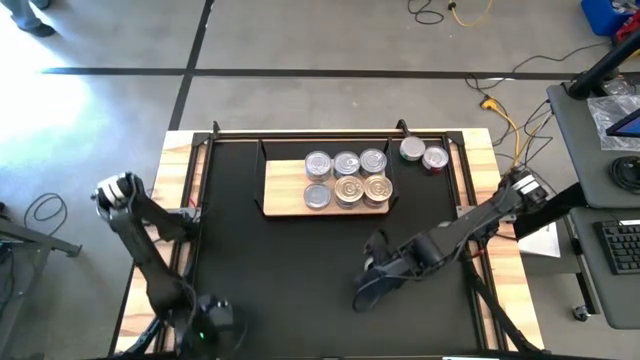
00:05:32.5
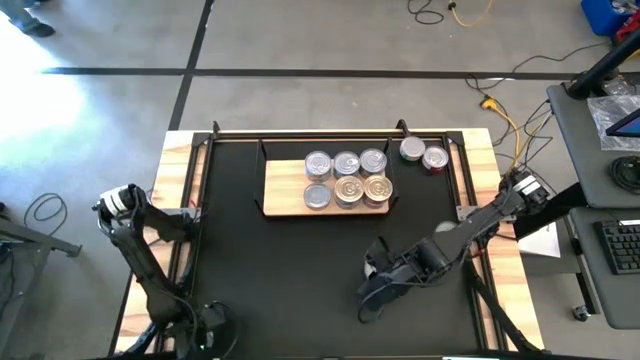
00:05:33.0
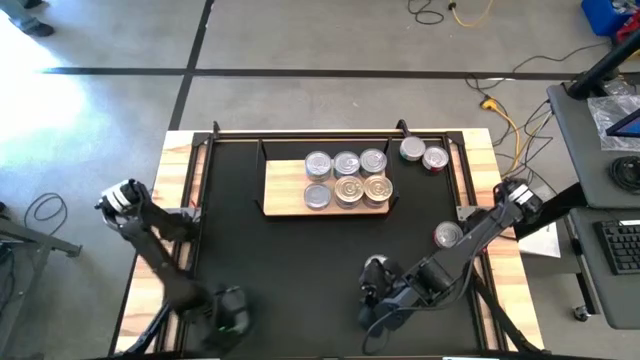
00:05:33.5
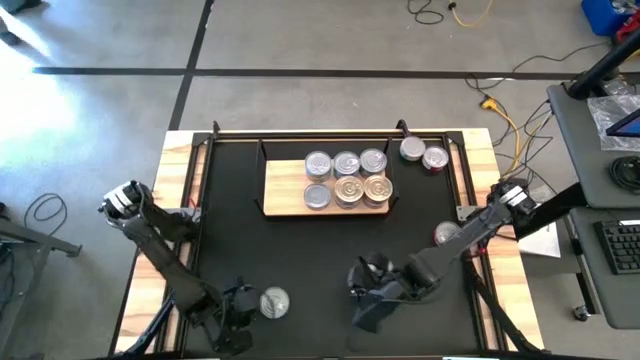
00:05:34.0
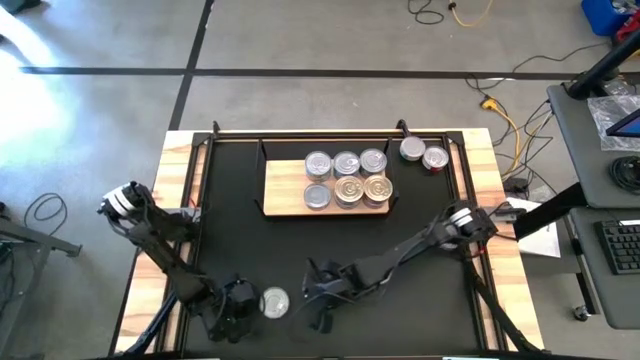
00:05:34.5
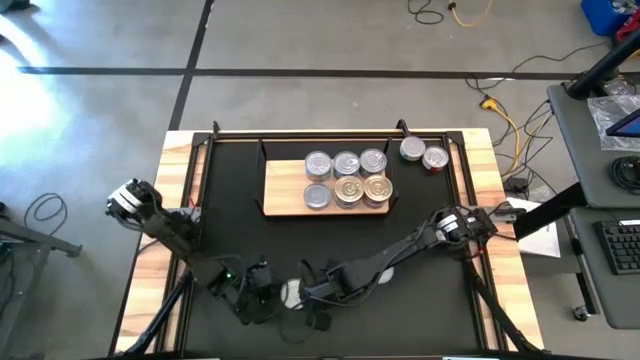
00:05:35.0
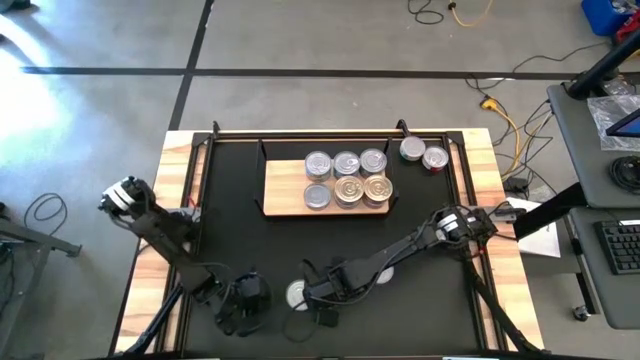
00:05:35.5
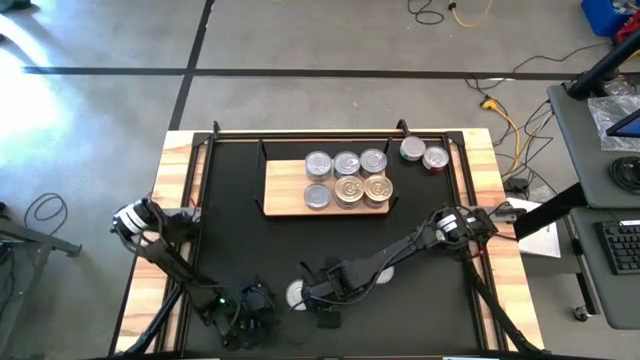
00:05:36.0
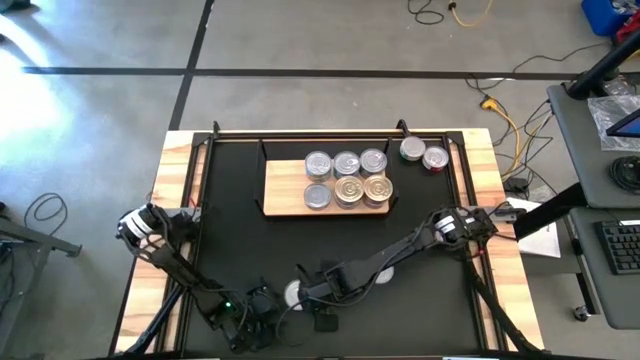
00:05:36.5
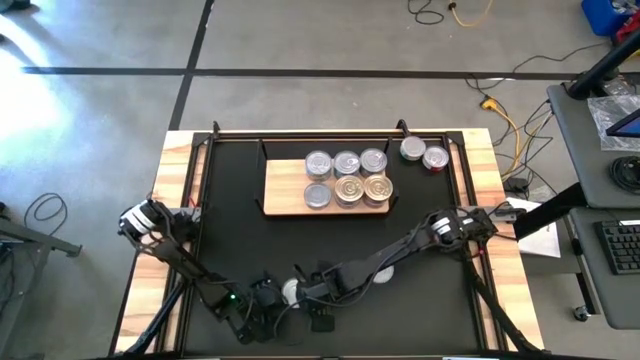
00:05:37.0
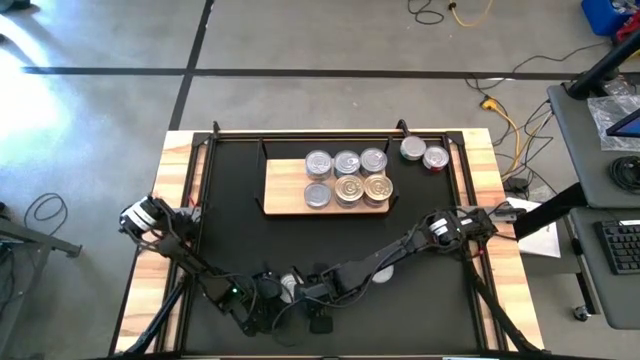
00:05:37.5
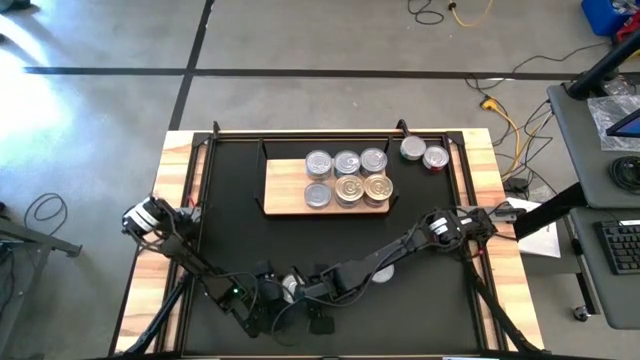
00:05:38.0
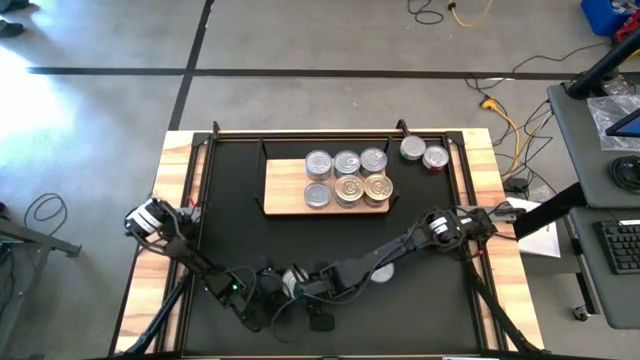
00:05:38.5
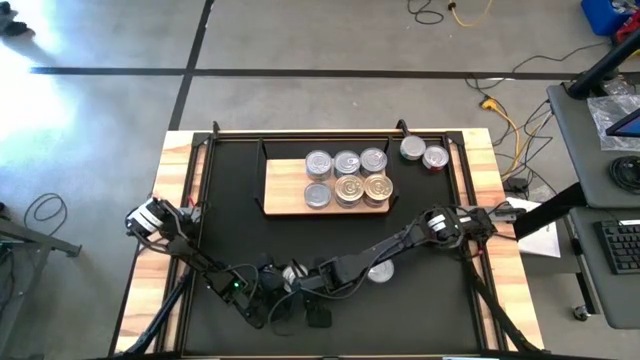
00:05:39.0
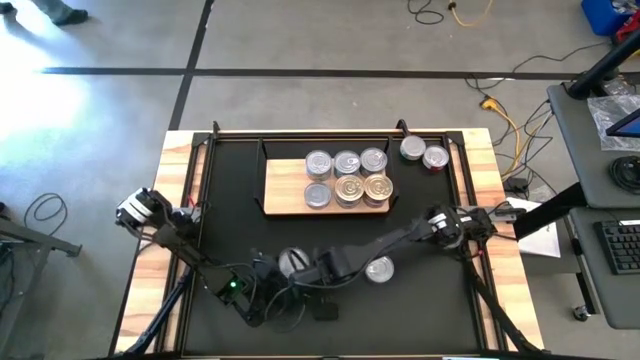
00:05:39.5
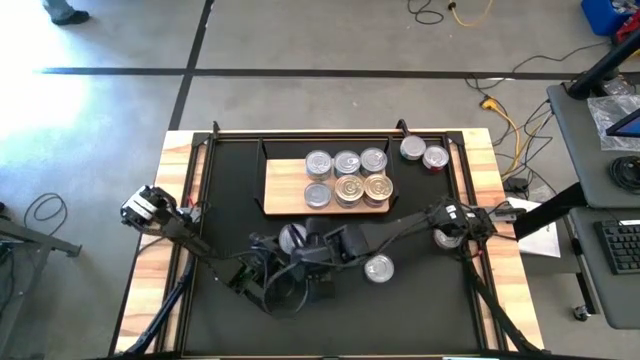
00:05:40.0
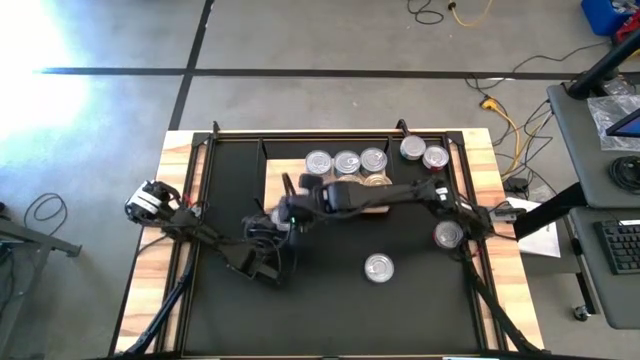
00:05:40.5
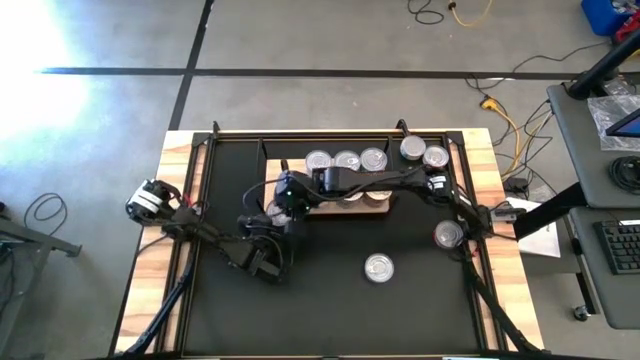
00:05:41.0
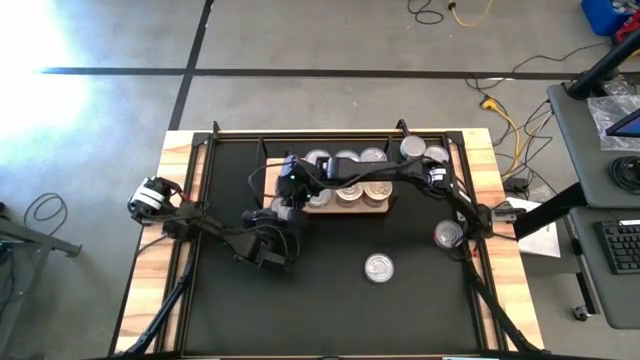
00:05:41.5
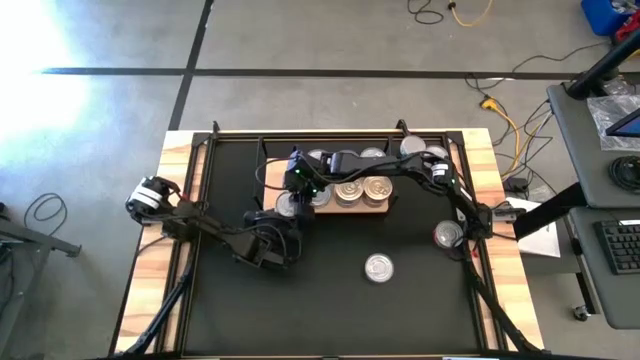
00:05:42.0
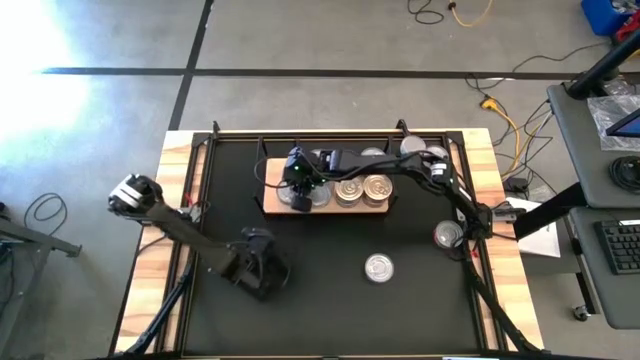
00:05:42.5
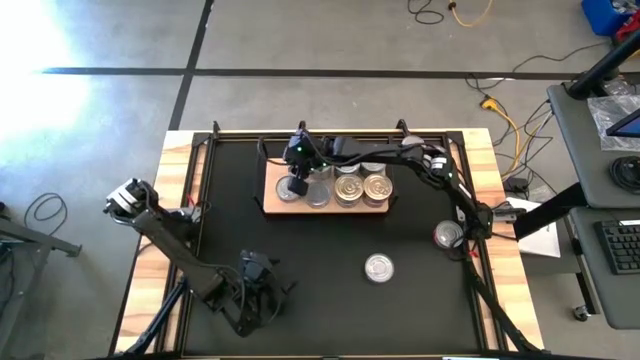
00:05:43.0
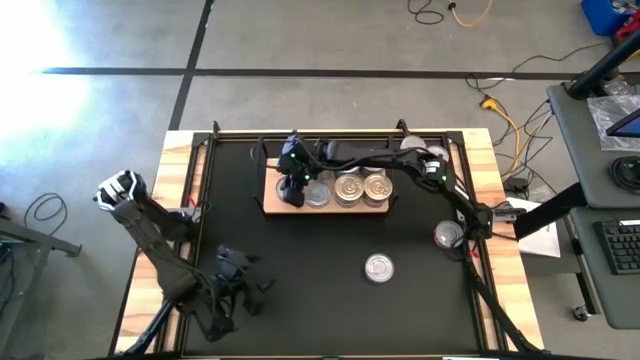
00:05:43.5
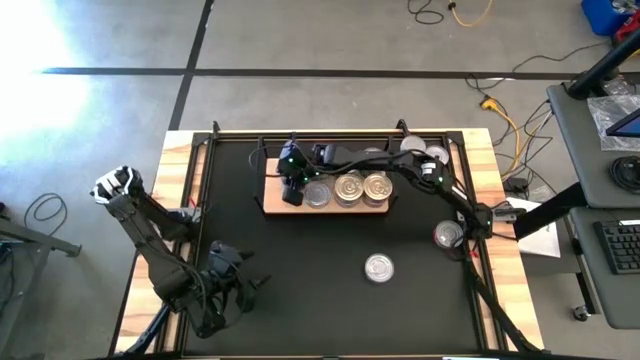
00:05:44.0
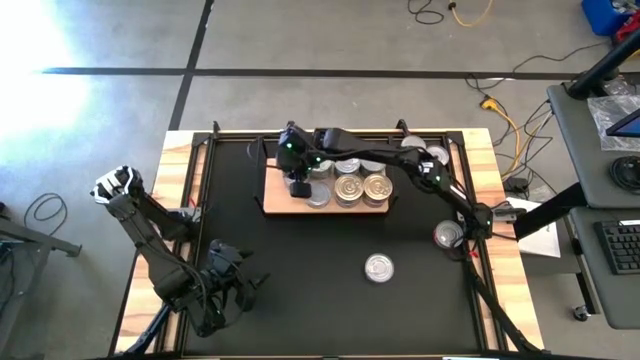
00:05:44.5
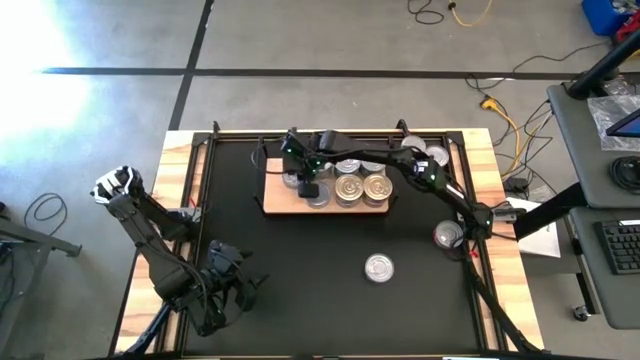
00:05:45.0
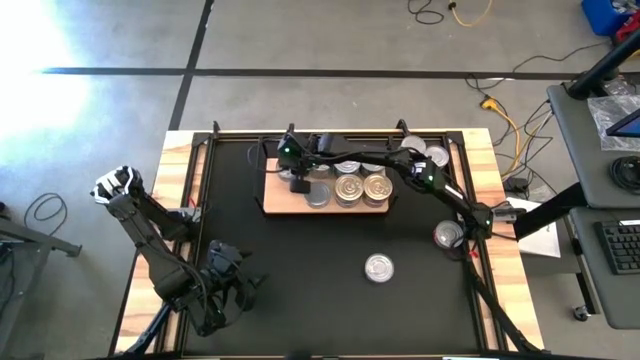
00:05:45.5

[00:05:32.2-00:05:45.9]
Task: Stack canned seafood by type on shelf
Put the bottom left dark blue tuna can on the shelf

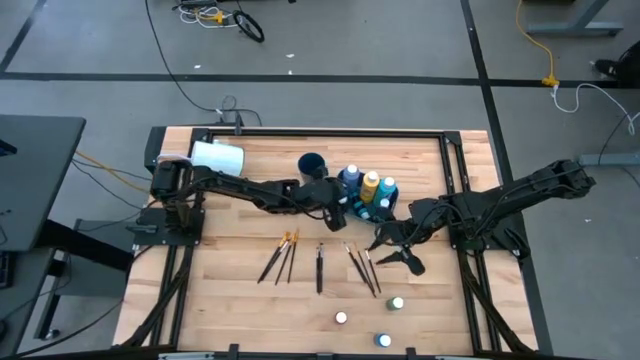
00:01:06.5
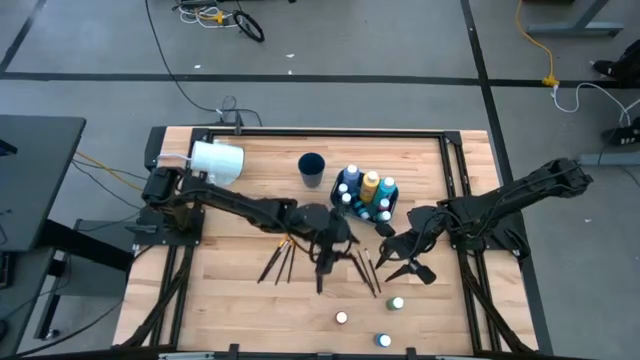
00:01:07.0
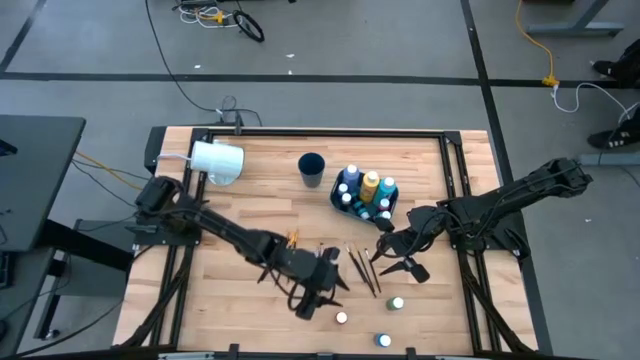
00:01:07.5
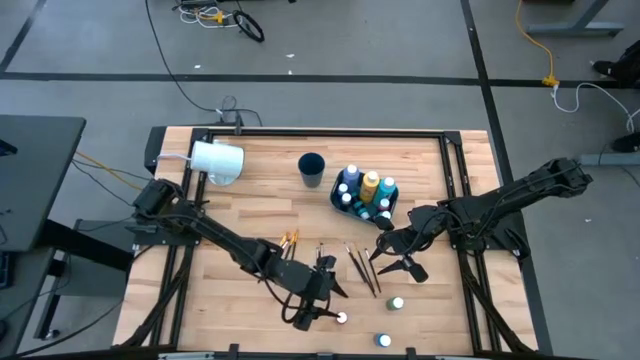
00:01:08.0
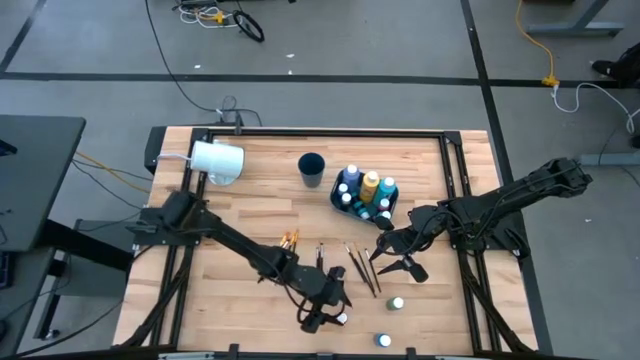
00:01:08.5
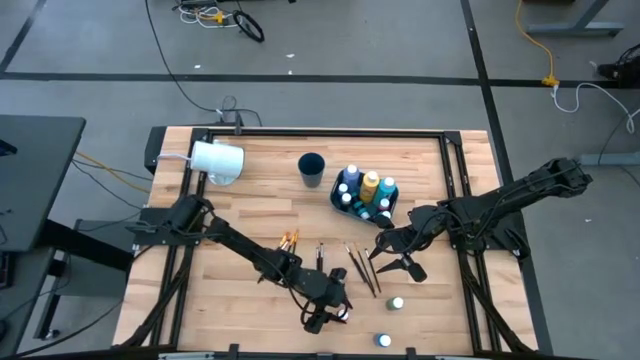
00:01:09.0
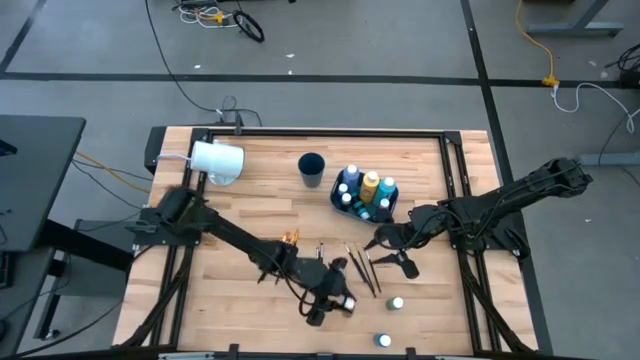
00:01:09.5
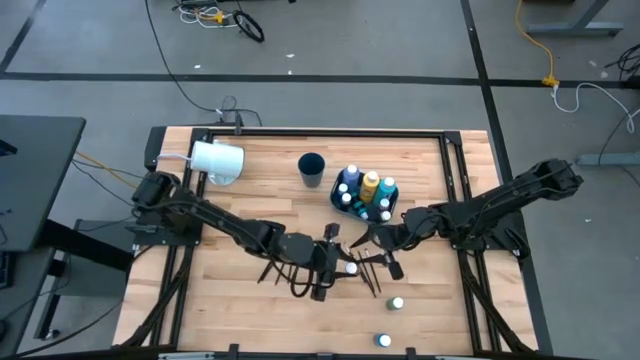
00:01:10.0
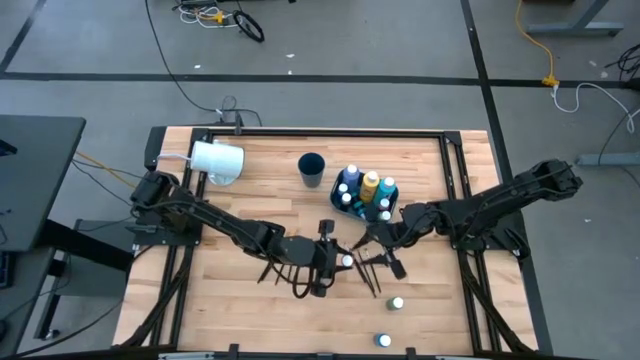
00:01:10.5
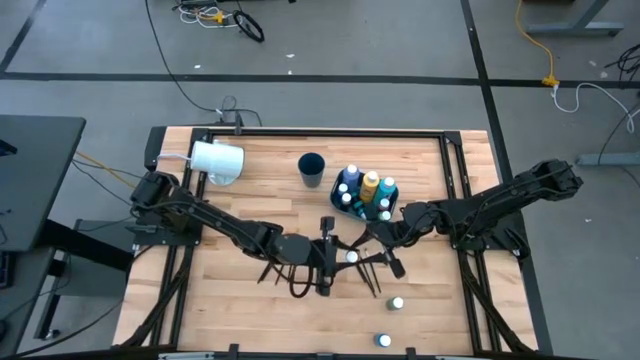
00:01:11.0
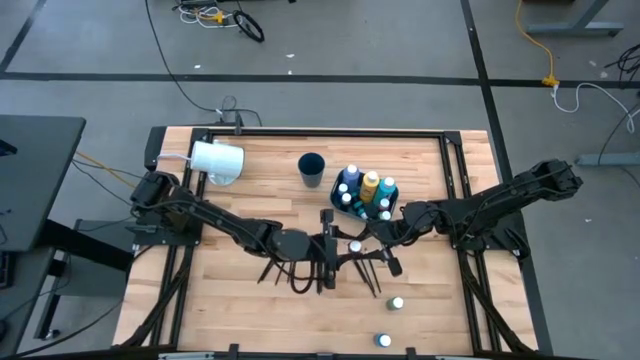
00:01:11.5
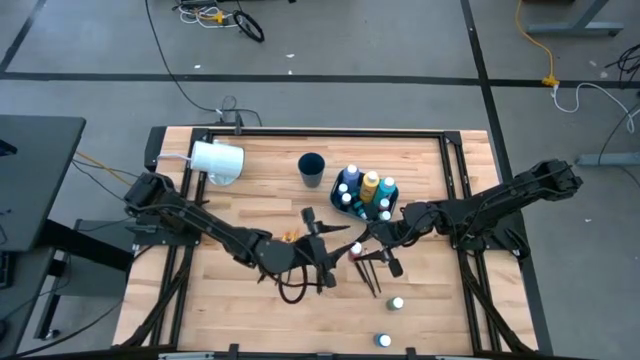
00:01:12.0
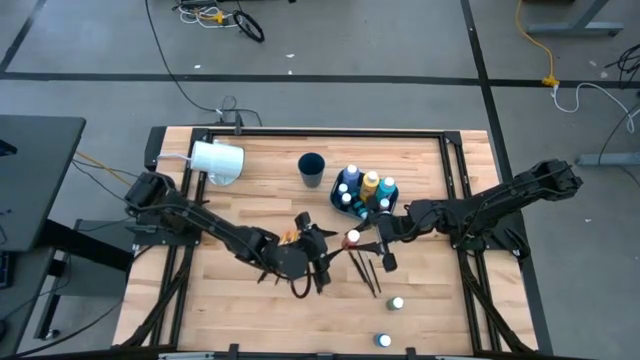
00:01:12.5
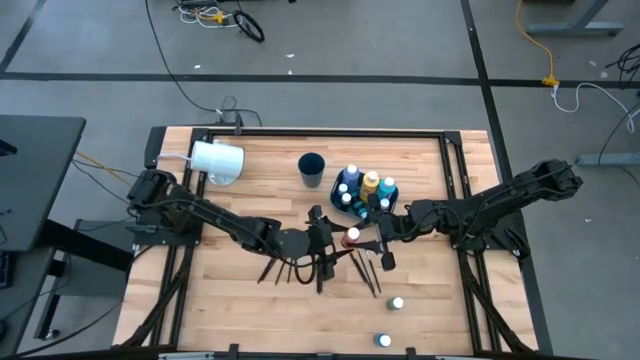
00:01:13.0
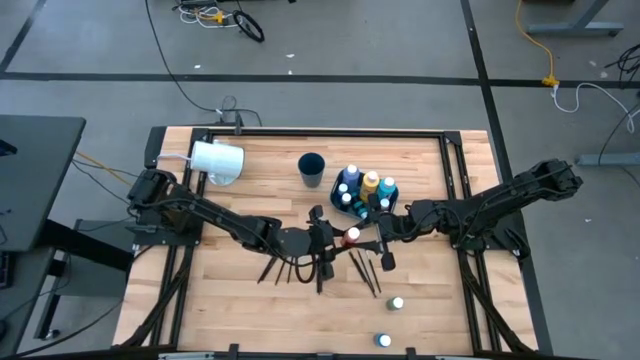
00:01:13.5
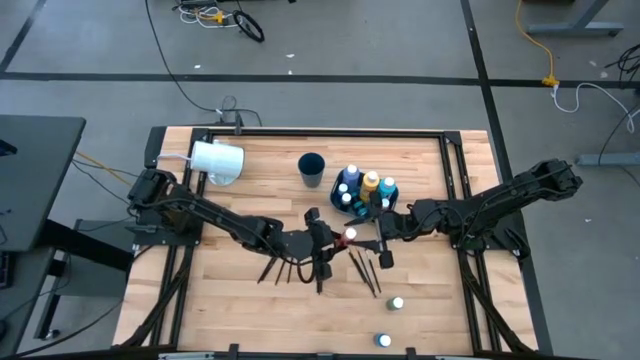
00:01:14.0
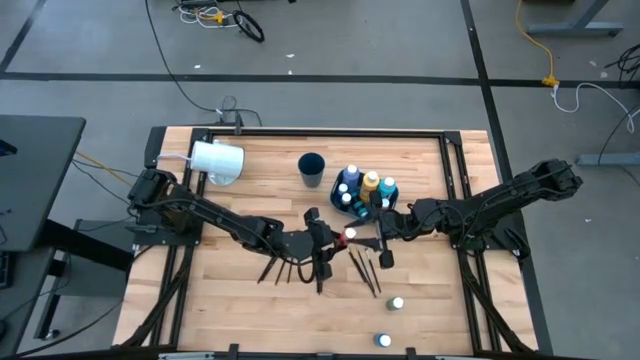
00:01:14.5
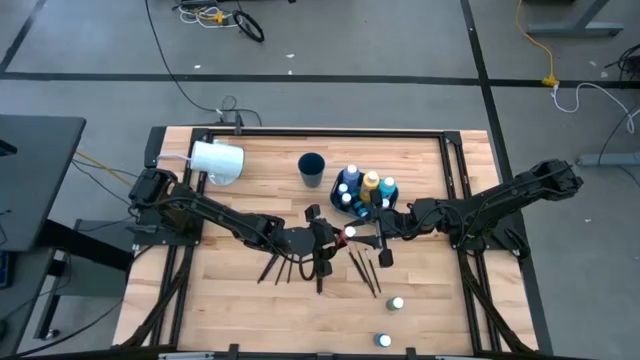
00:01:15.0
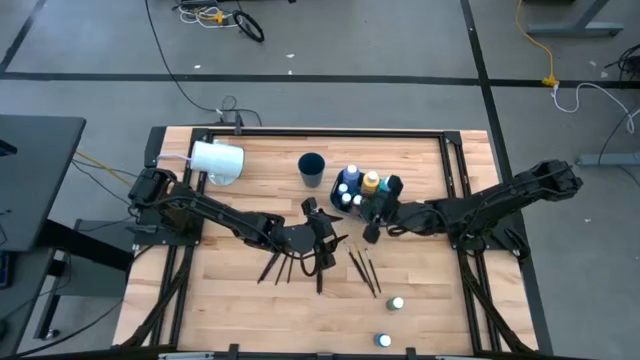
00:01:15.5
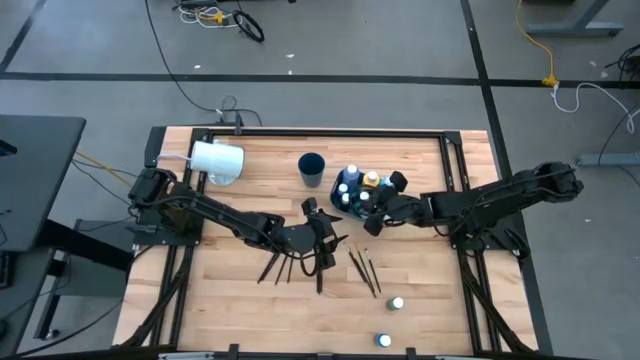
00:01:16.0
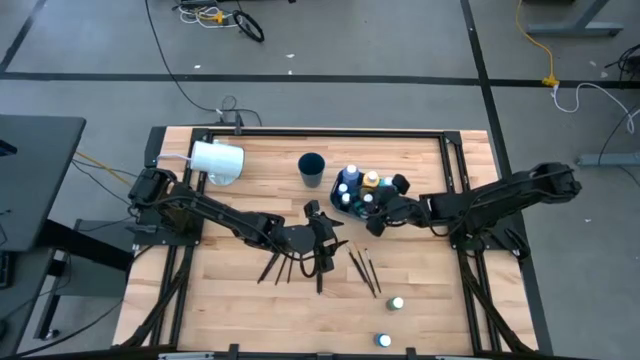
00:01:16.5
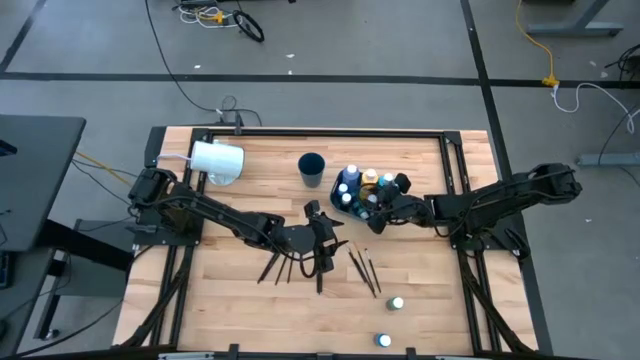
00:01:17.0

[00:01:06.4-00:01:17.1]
Task: Pick & Place Paint Supplies
Put the small red paint bottle into the blue bin
